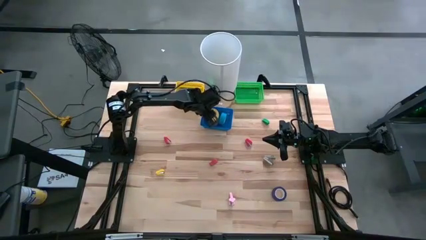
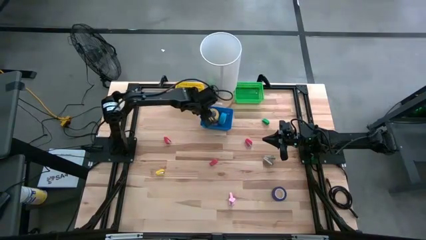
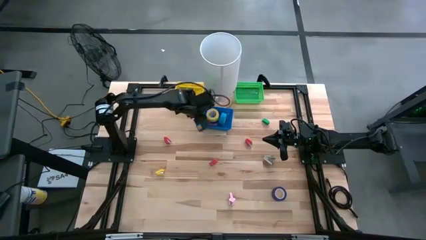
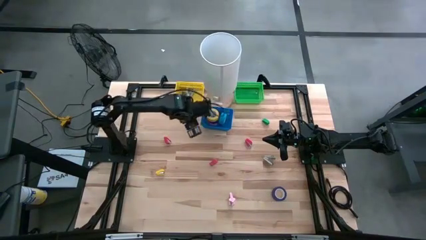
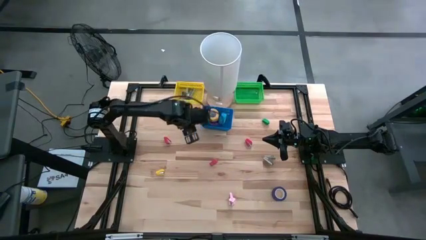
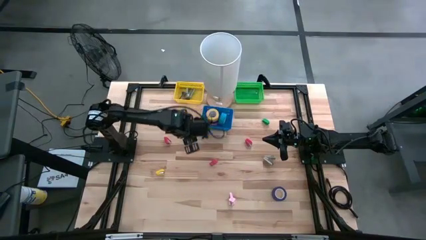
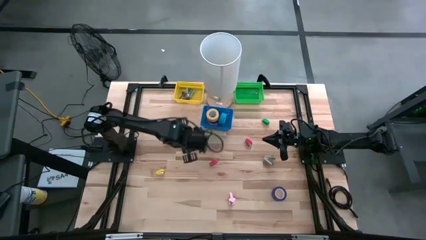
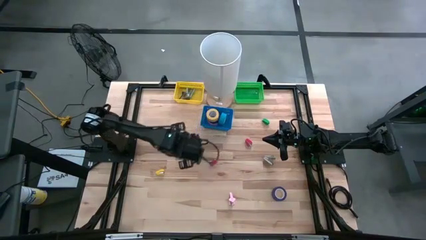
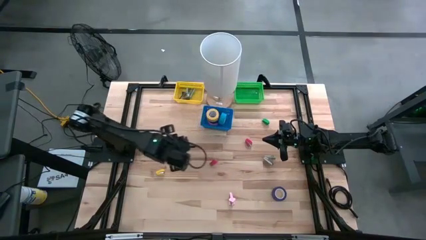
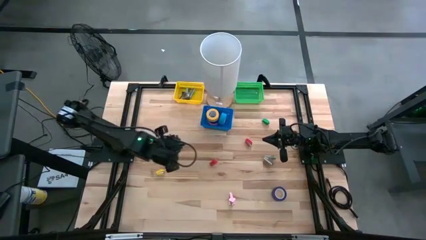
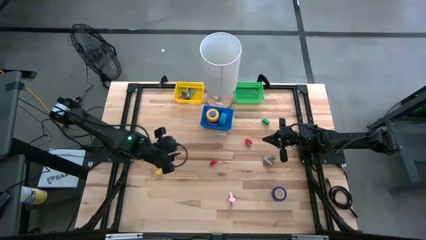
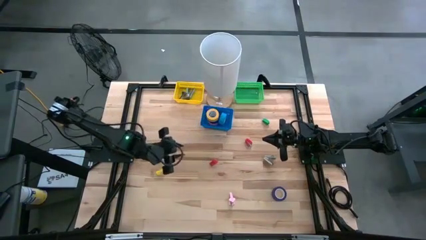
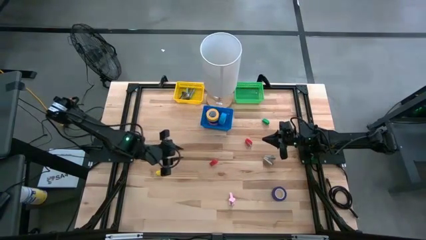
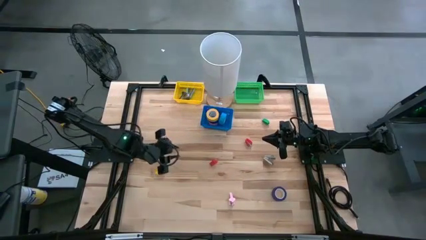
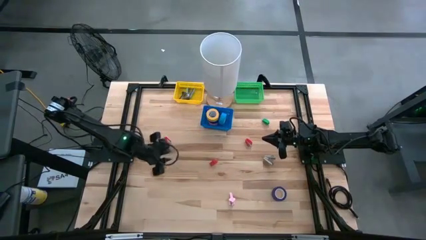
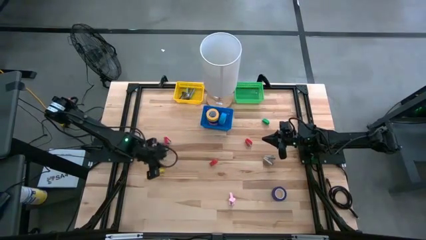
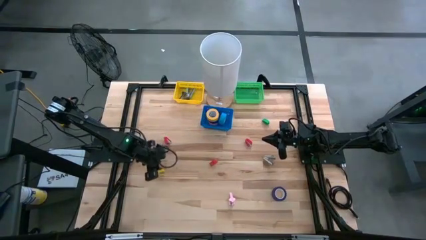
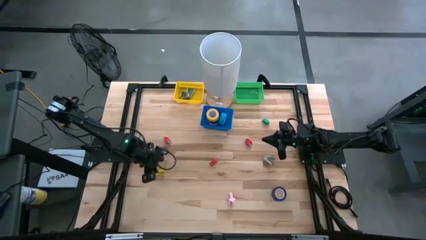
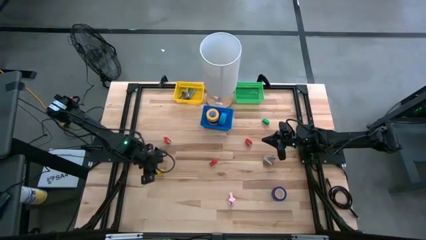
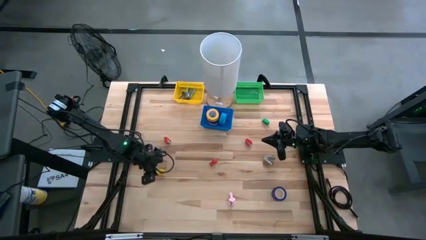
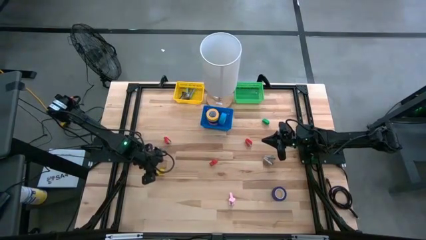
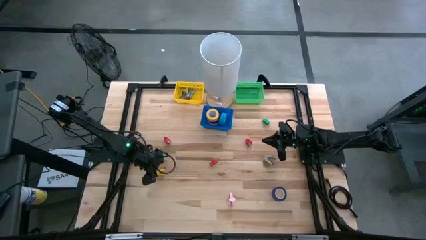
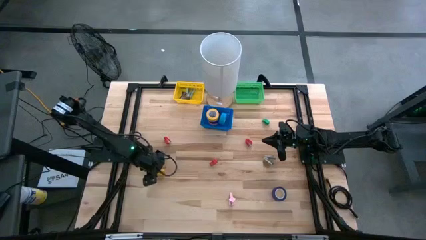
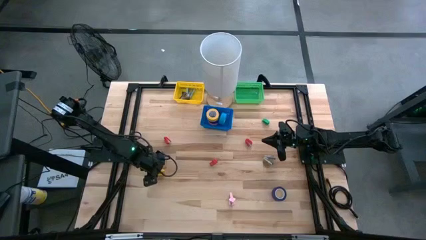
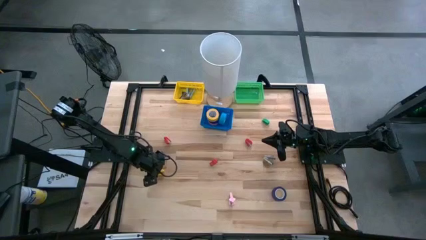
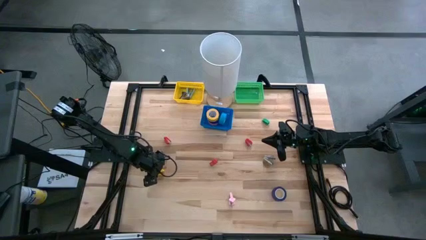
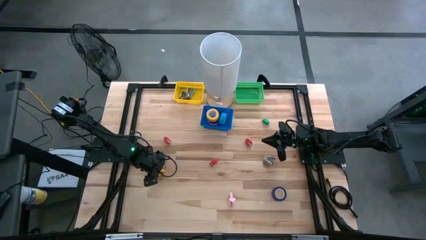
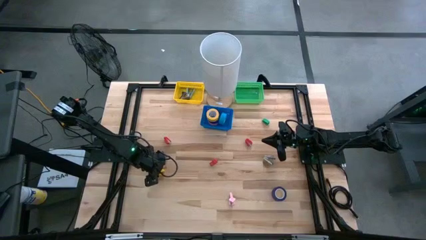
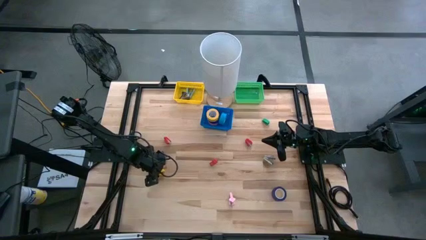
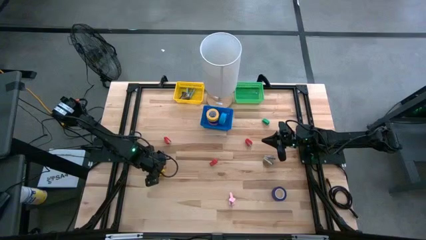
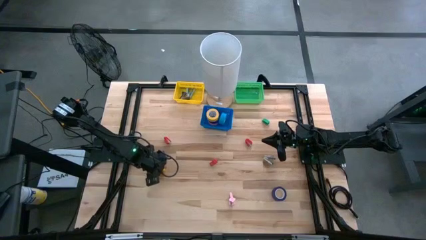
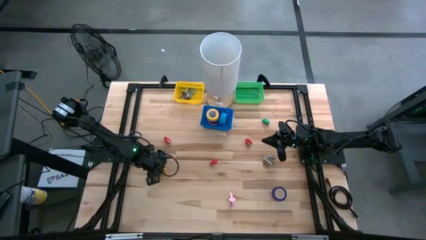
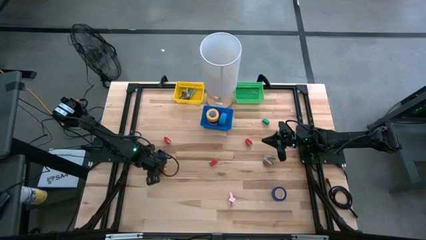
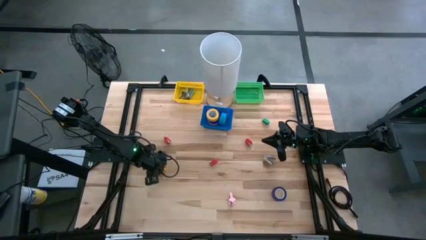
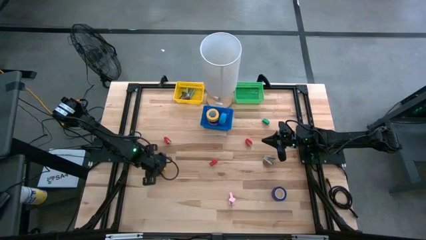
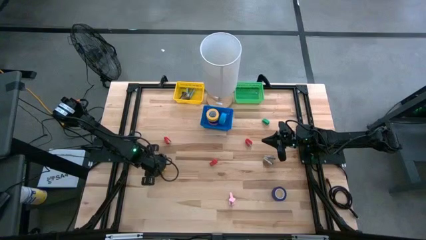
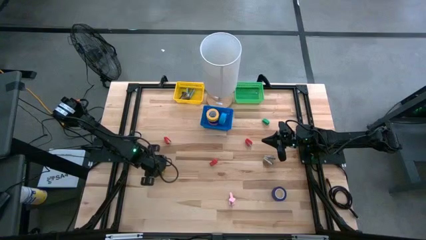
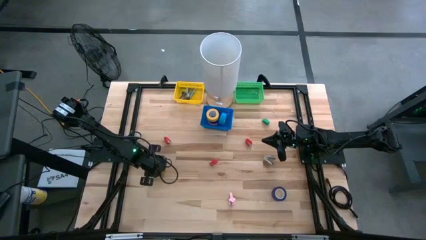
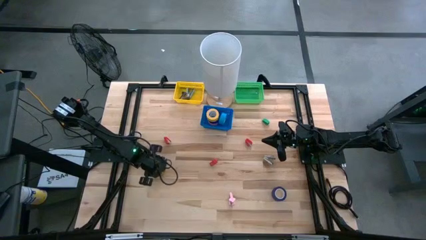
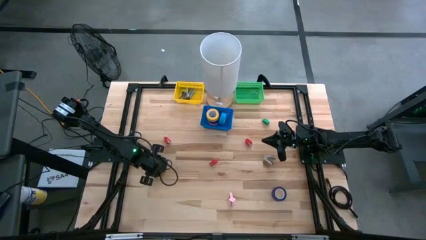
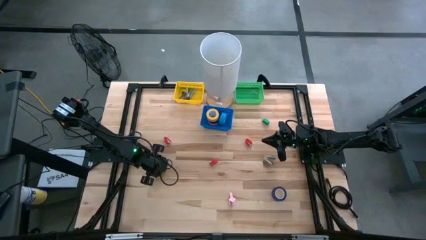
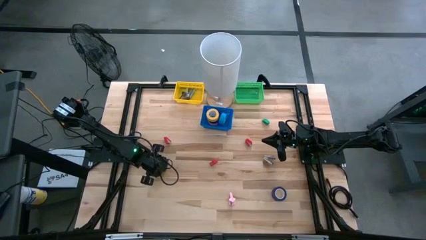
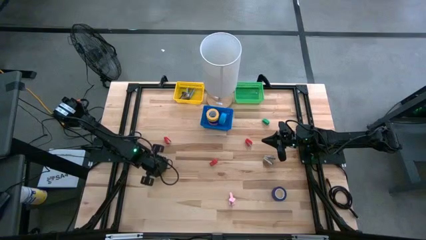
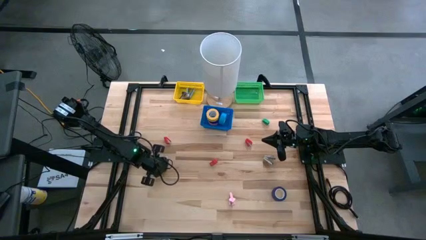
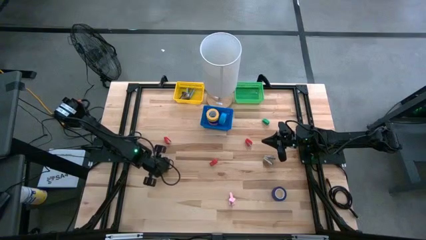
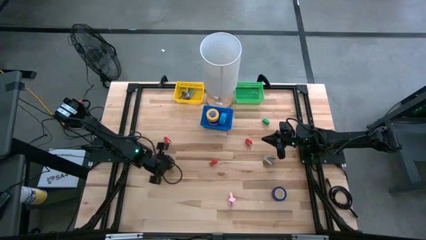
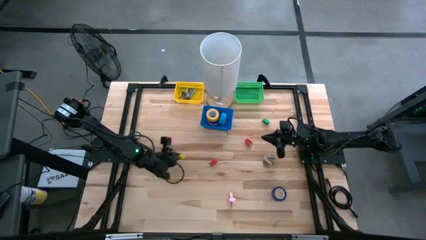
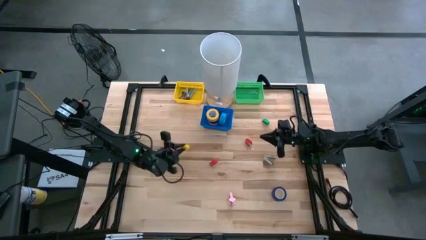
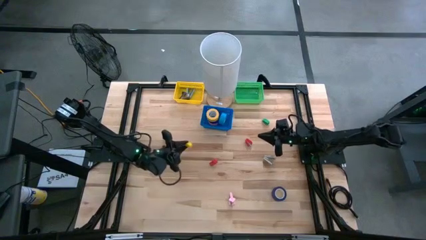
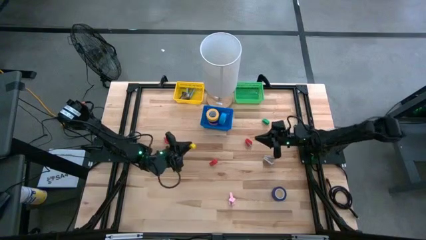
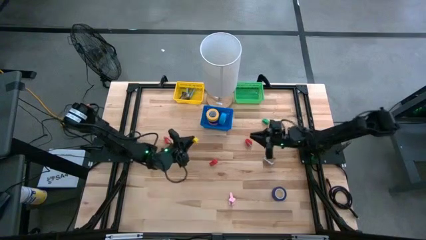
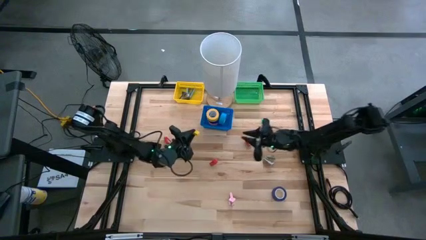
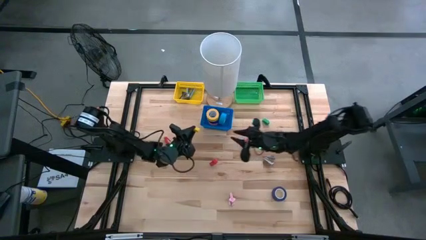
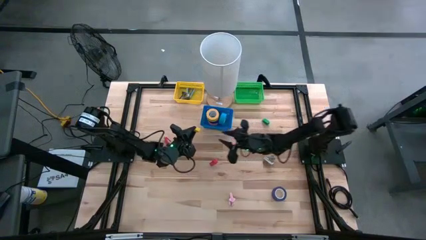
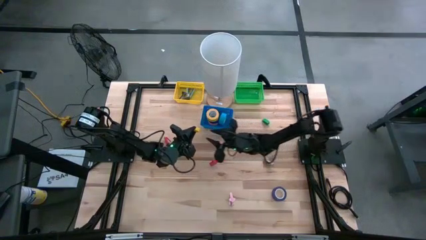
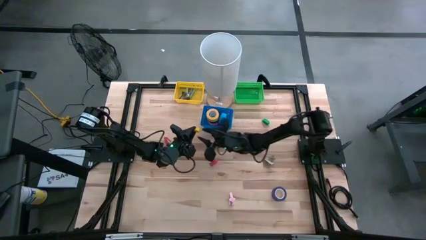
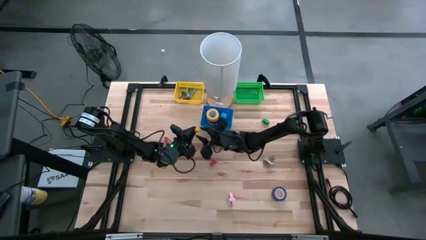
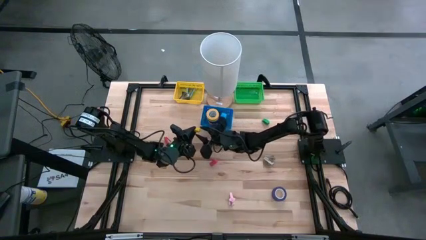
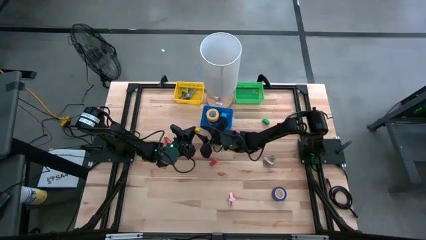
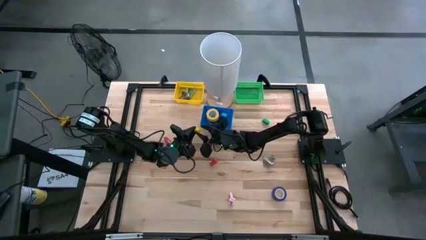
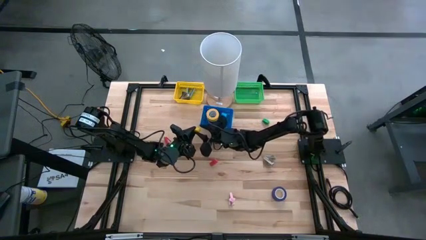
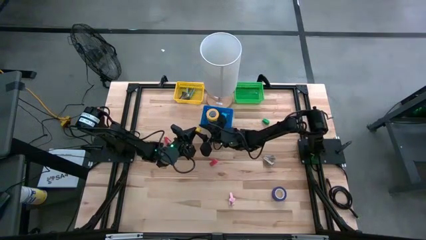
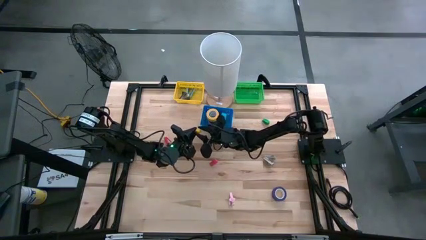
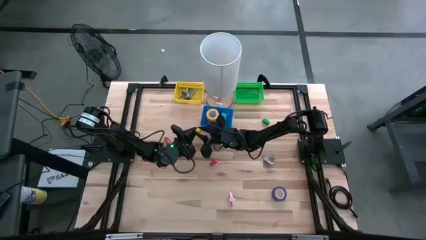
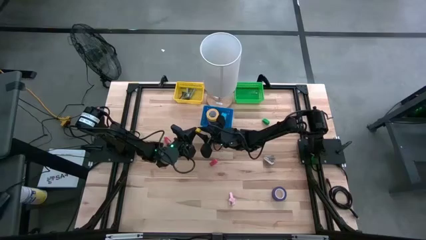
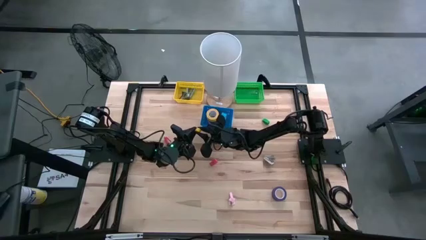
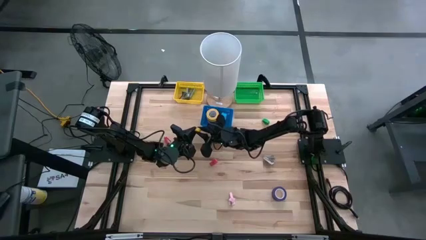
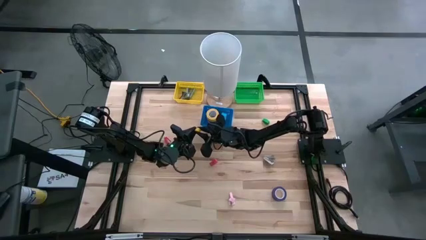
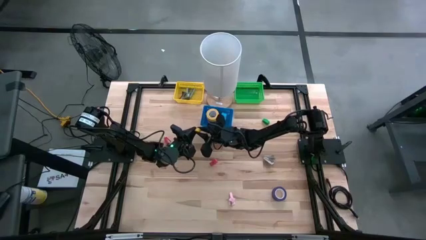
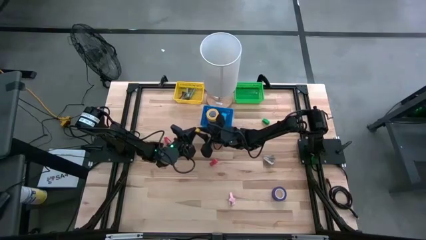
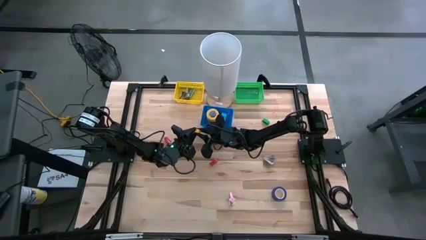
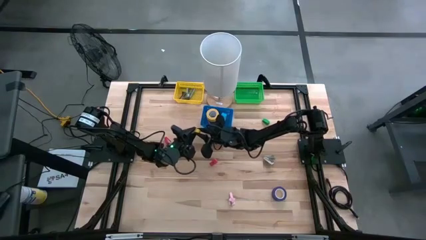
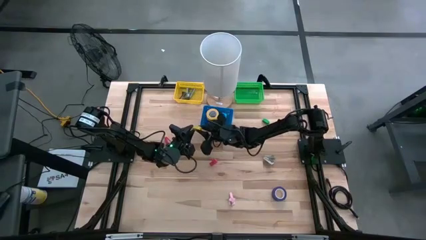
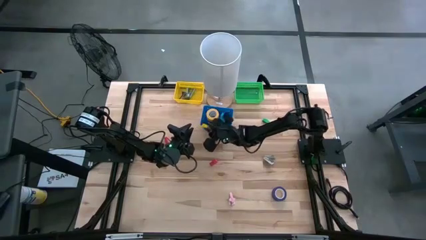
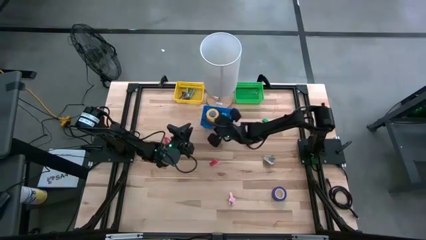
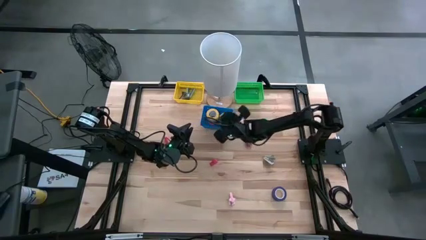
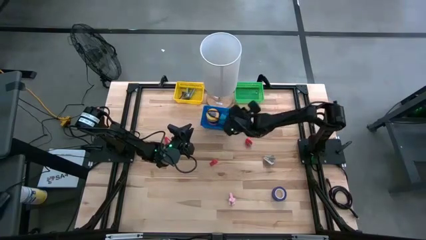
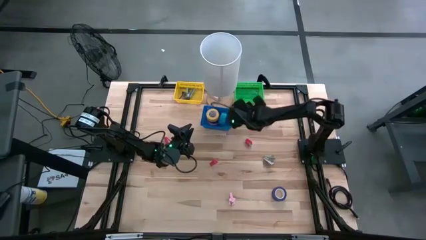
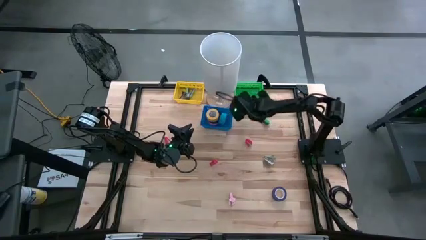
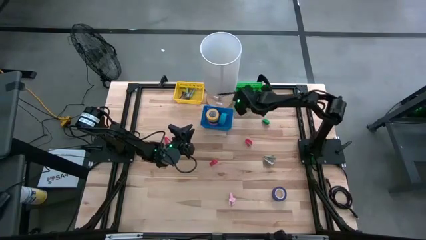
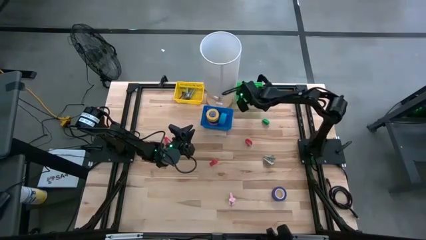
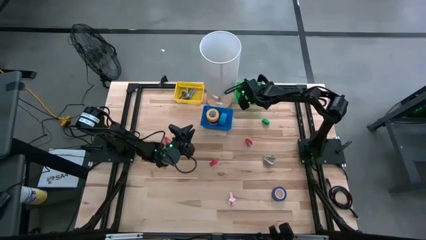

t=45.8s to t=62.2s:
Task: Pick and place Stapler, Stapler remover, tape
Put the yellow stapler into the green basket
